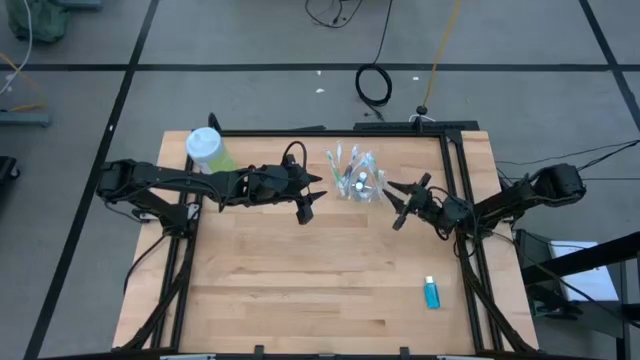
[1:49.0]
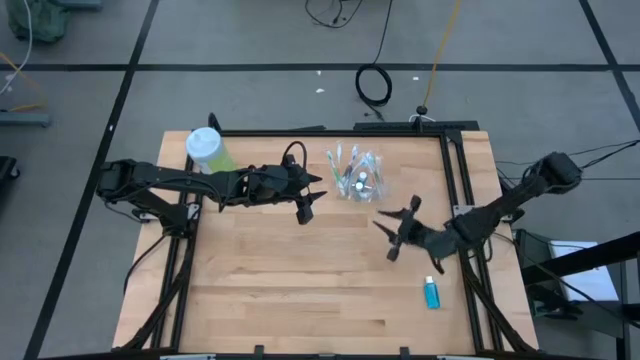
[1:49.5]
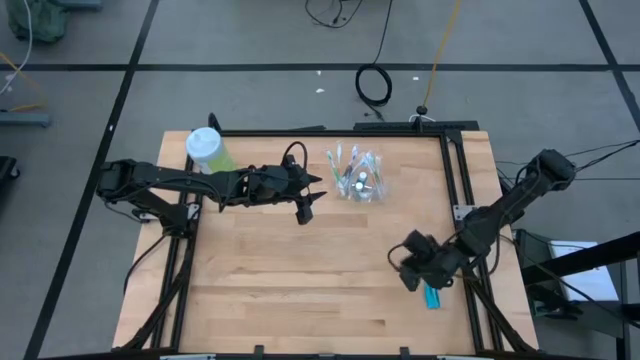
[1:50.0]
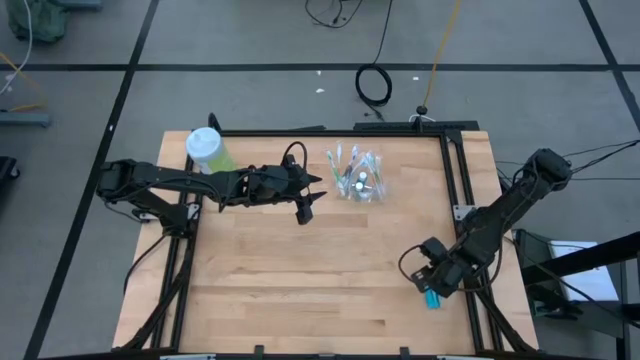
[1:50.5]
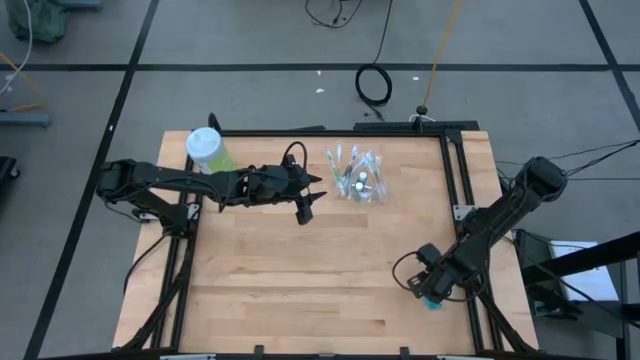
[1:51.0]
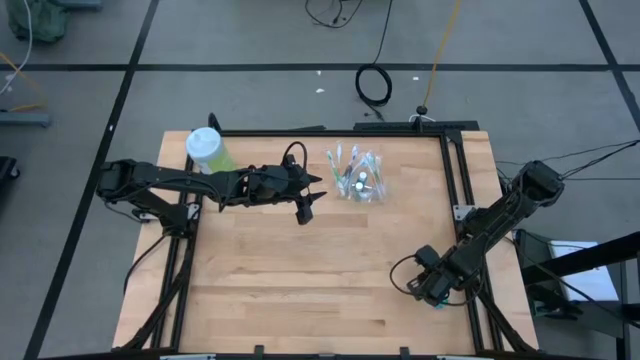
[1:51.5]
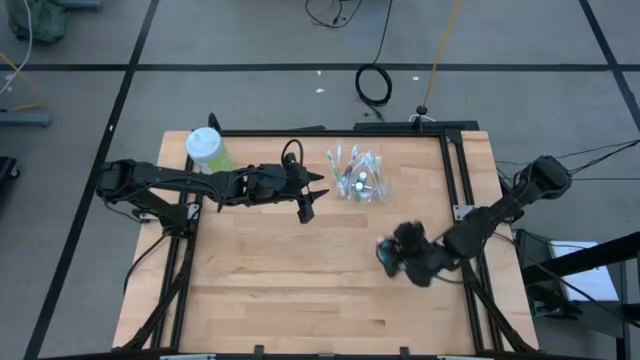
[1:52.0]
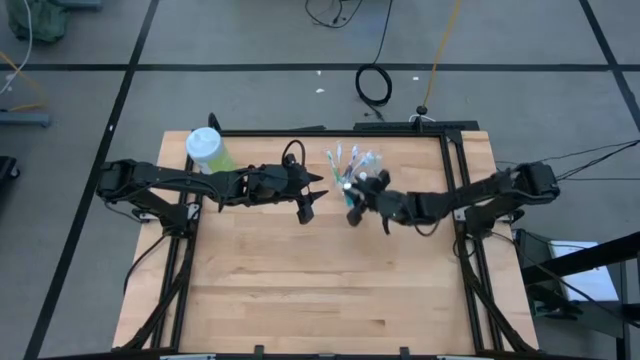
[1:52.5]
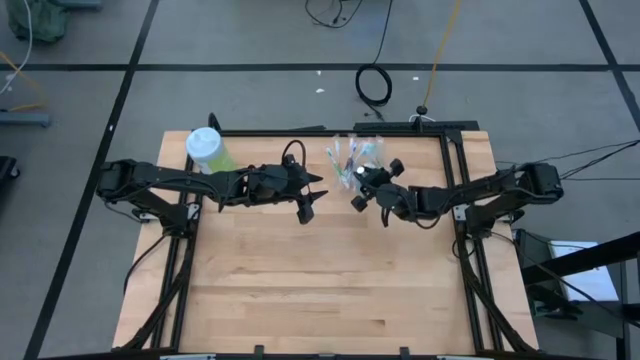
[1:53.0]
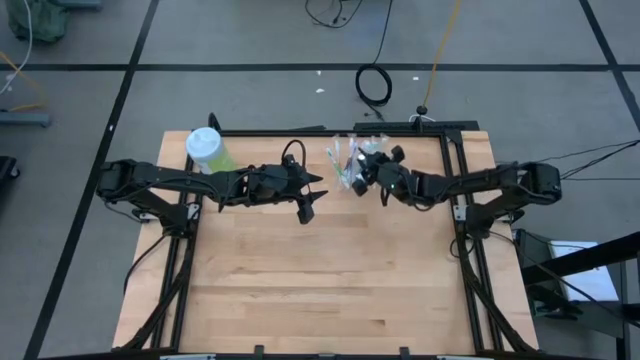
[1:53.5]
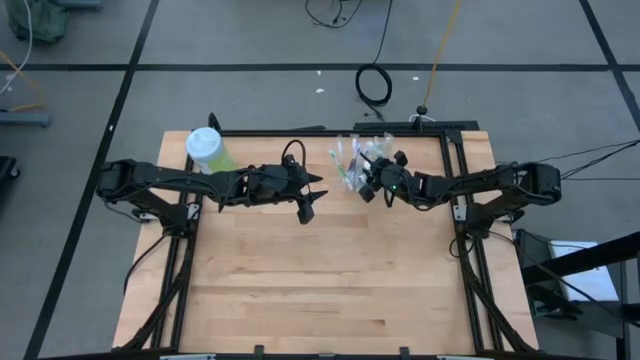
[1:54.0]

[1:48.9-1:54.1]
Task: Pick & Place toothbrushing station
Put the blue mouthwash into the transparent organizer

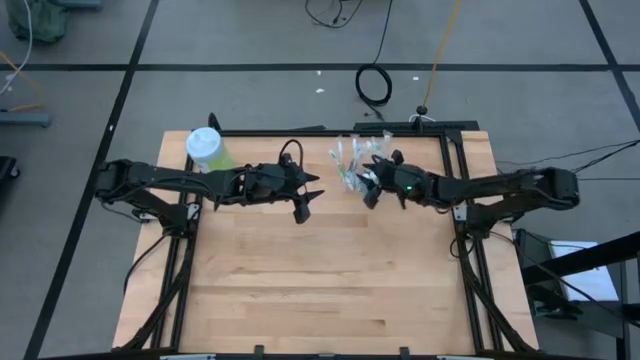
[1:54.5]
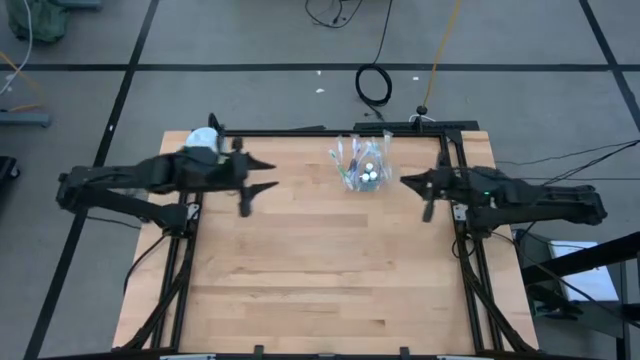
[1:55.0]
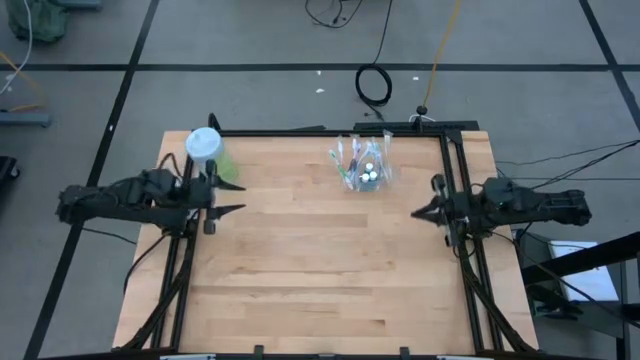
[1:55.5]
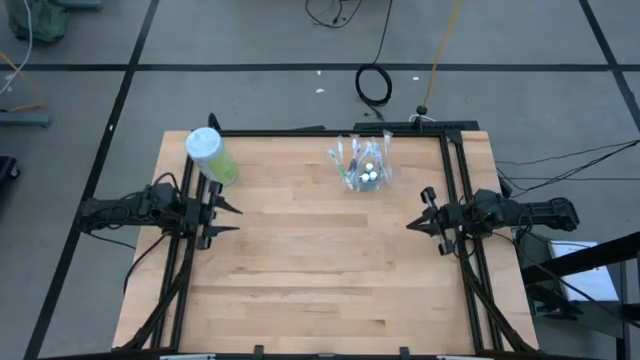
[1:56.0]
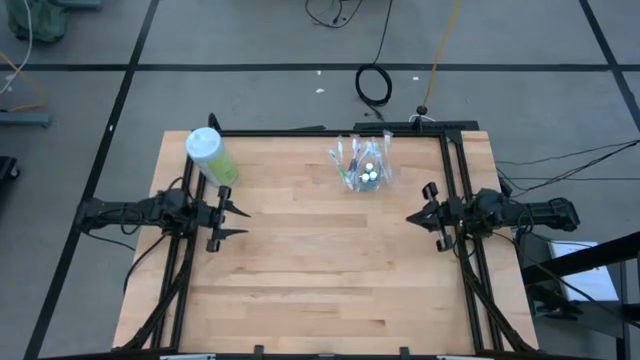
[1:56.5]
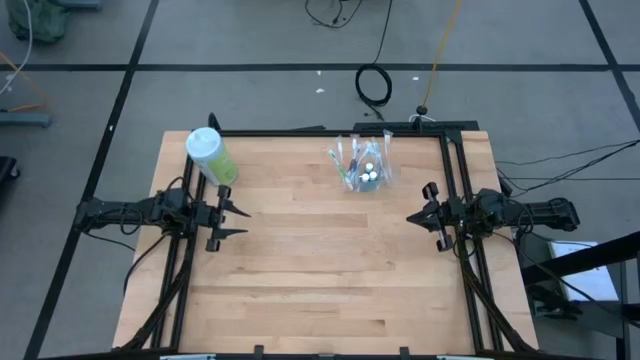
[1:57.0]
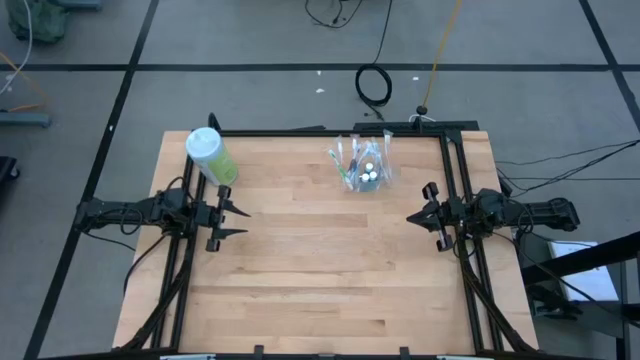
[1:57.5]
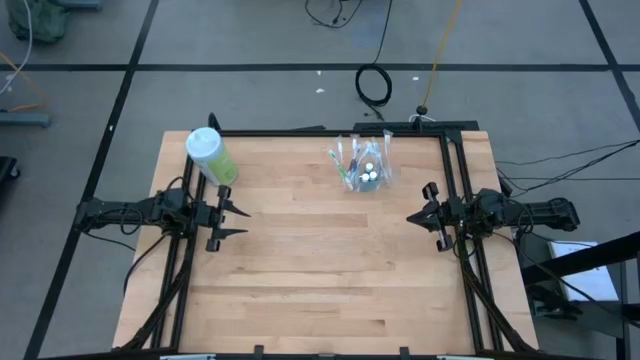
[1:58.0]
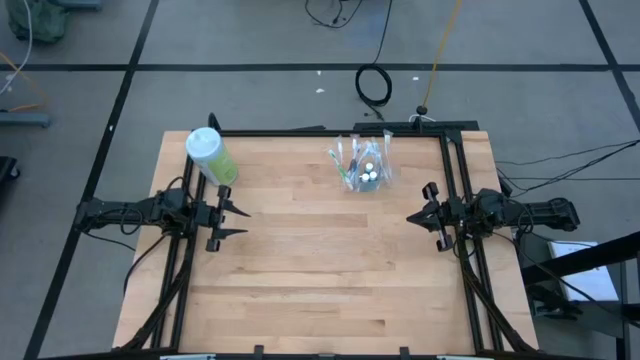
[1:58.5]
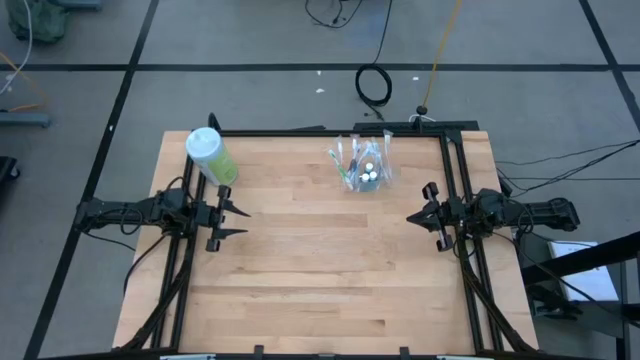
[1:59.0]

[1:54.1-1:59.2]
Return to Home Position

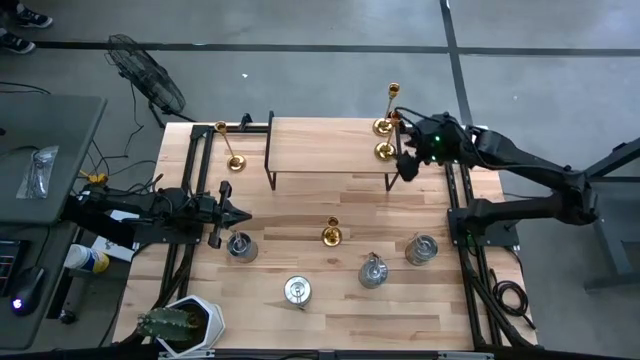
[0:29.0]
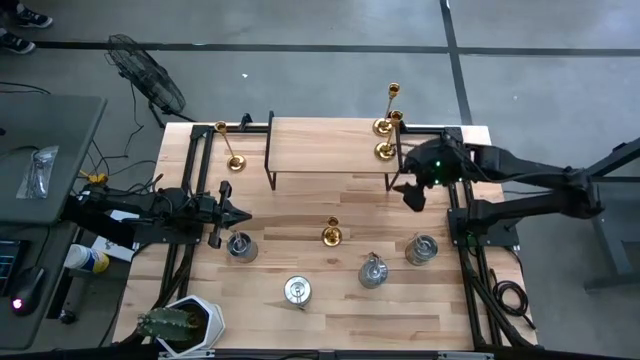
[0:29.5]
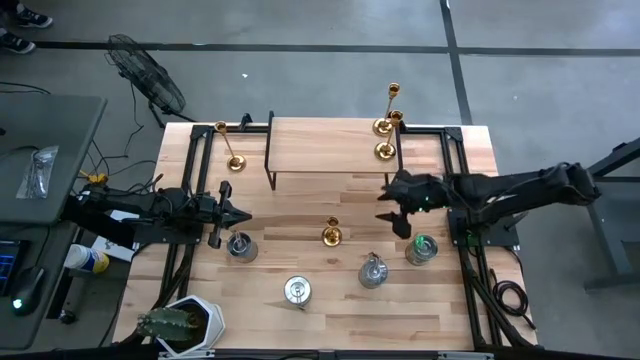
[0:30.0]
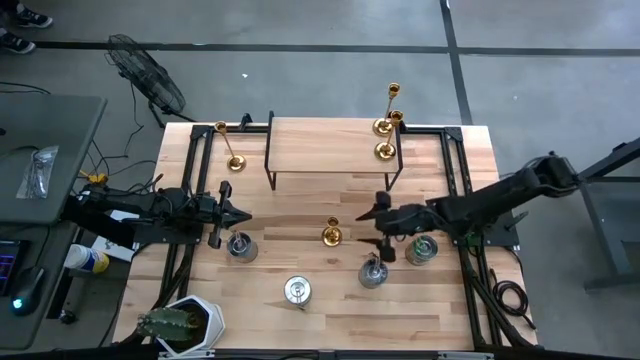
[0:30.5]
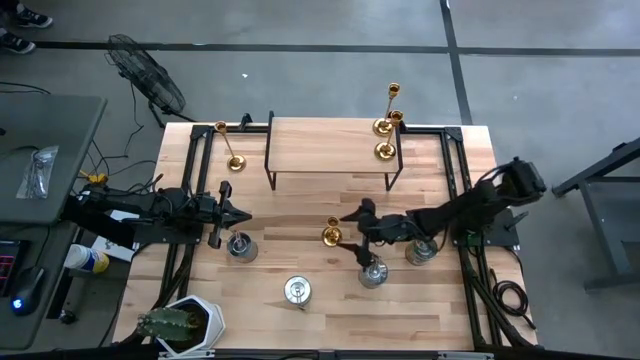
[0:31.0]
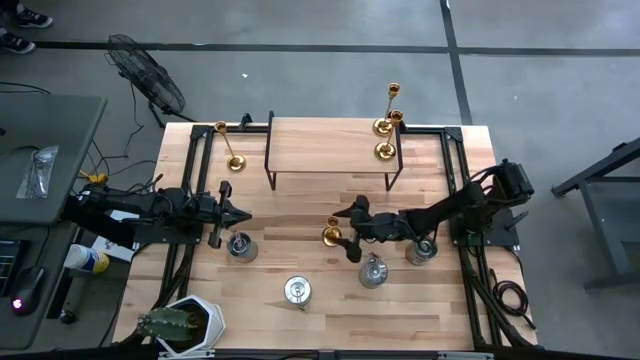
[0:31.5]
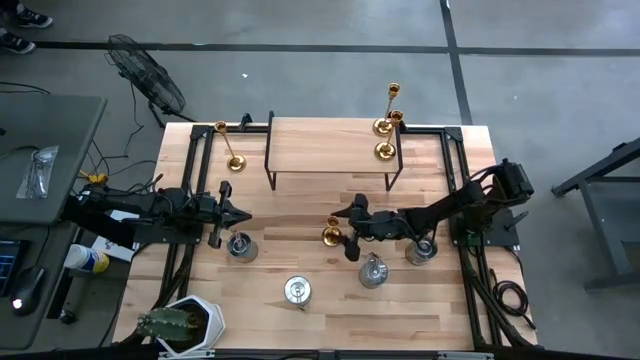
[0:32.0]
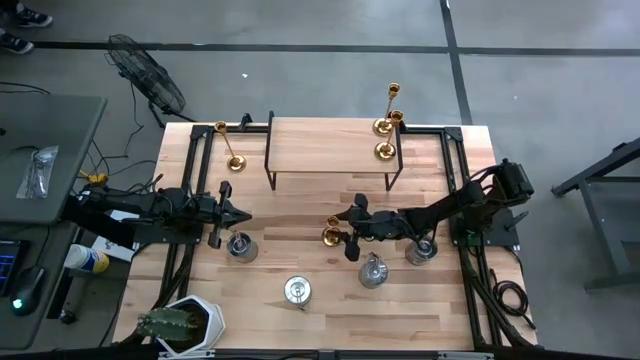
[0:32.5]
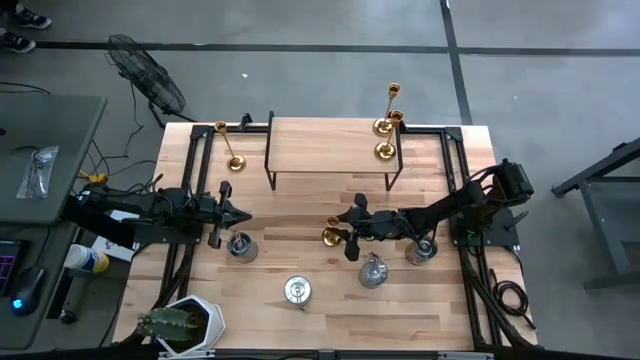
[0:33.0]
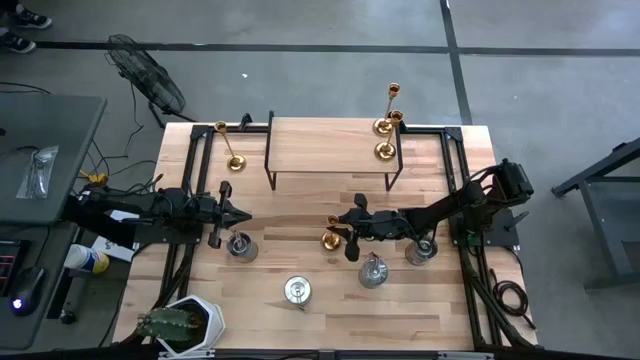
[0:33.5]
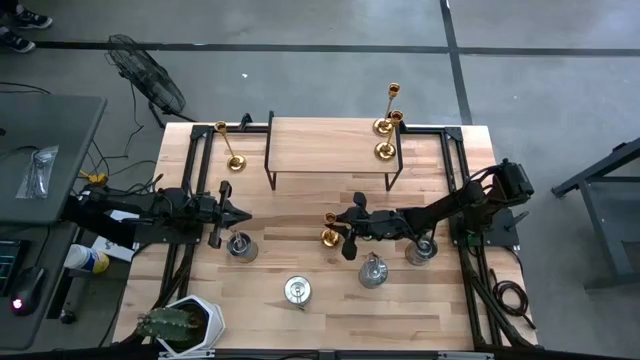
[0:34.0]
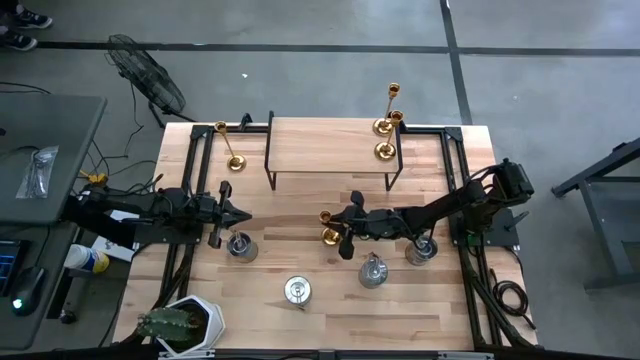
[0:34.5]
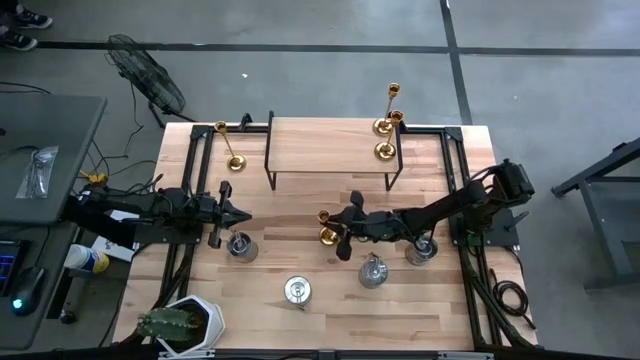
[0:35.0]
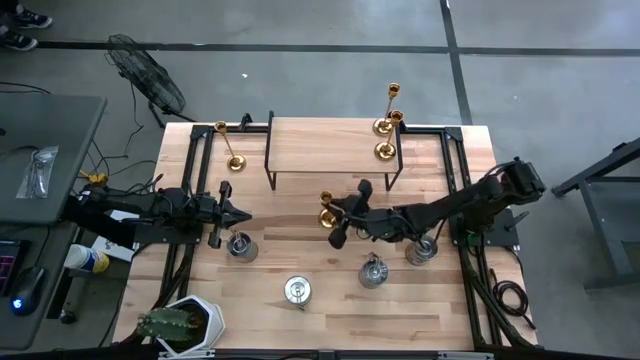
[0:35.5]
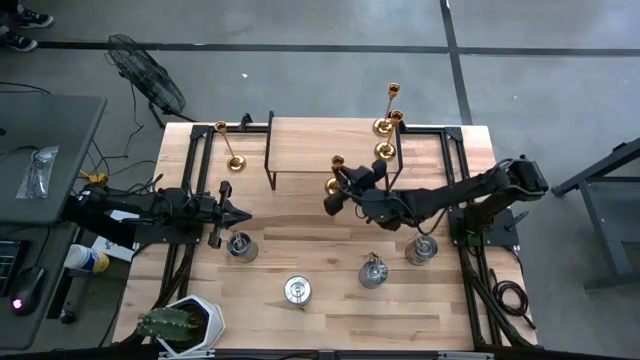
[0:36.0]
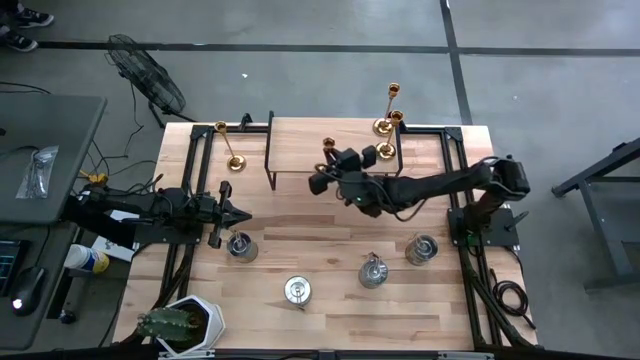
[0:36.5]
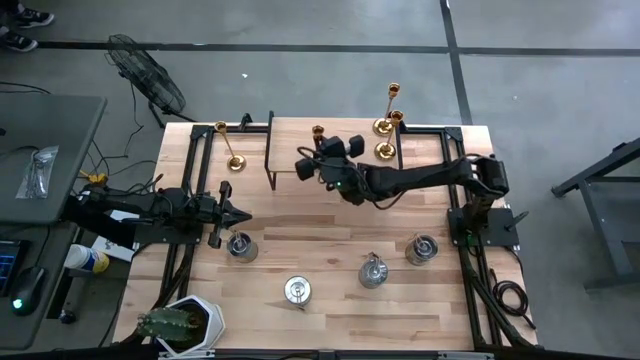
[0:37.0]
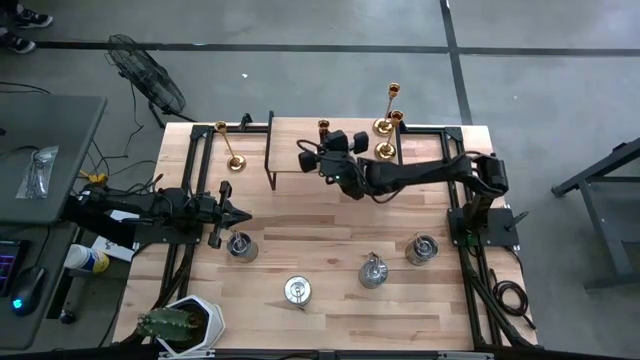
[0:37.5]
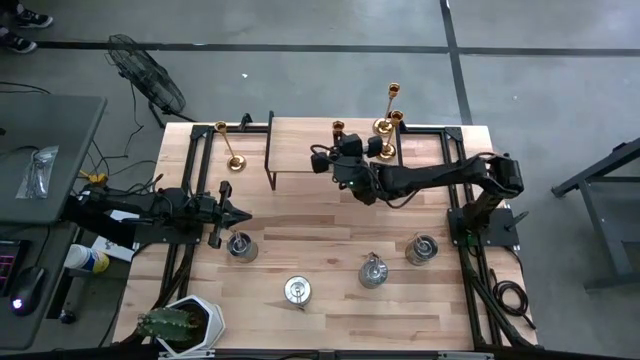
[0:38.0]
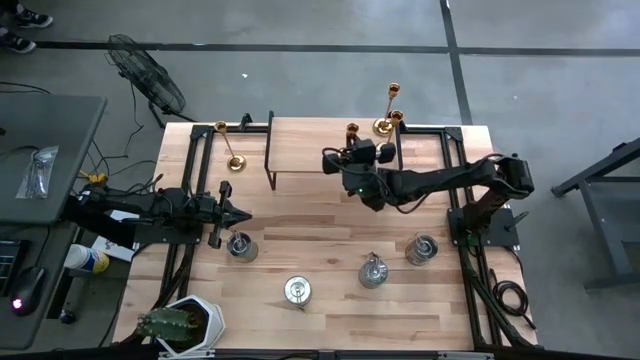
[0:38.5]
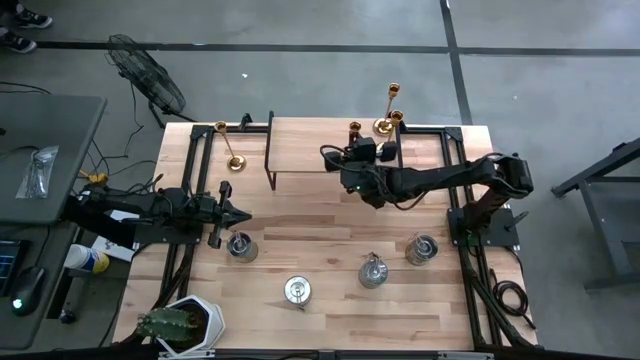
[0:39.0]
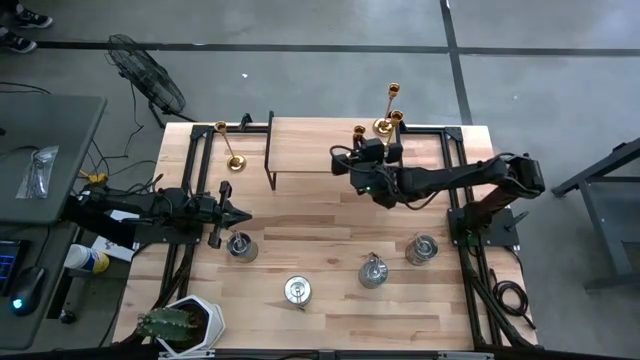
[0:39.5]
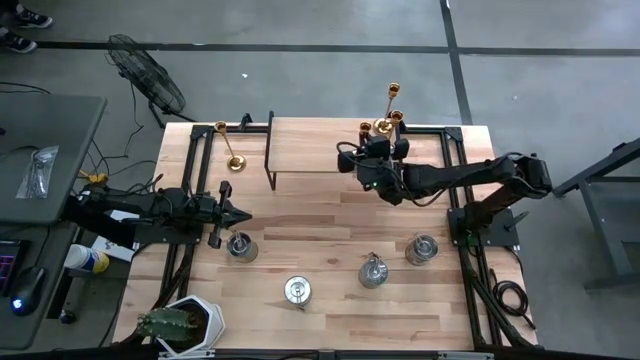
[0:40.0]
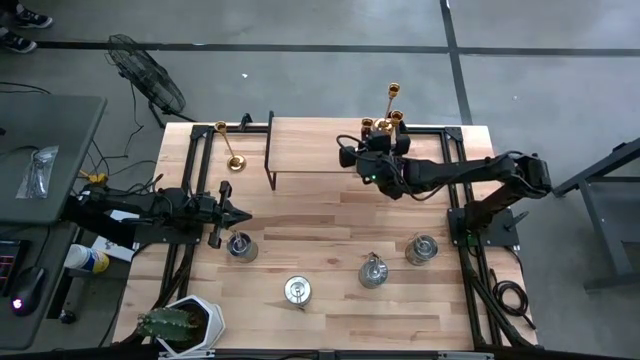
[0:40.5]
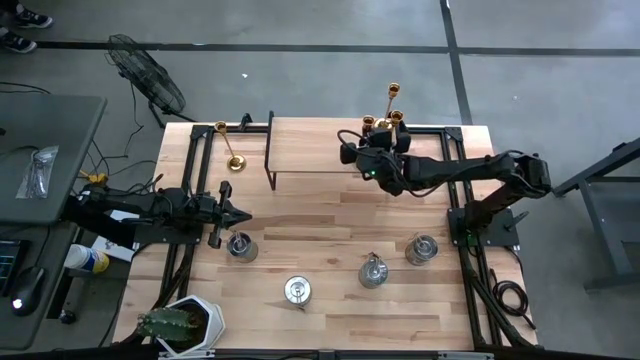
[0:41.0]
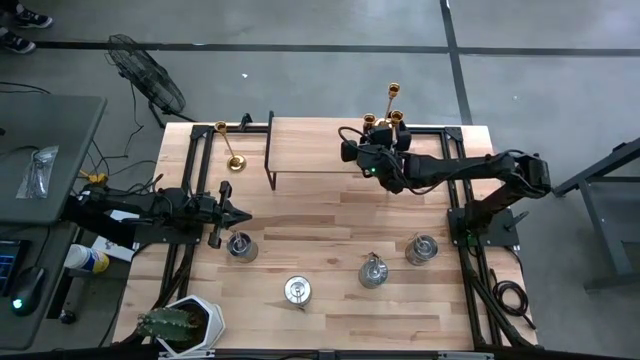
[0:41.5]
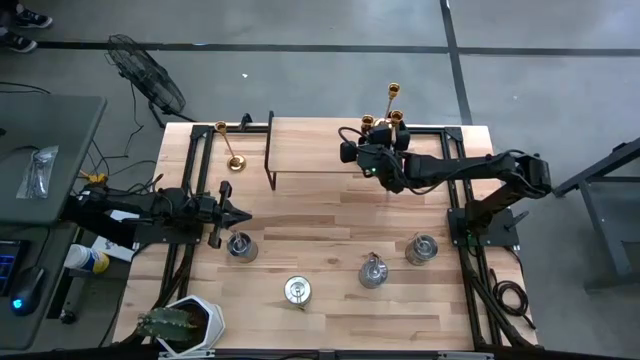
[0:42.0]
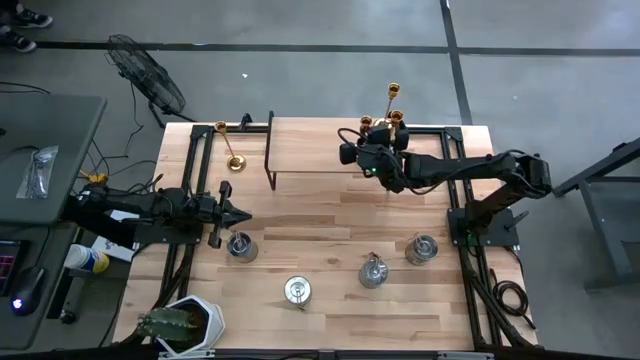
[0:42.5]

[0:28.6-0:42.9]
Task: Pick & Place candle stick holders
Put the gold candle holder on the shelf
